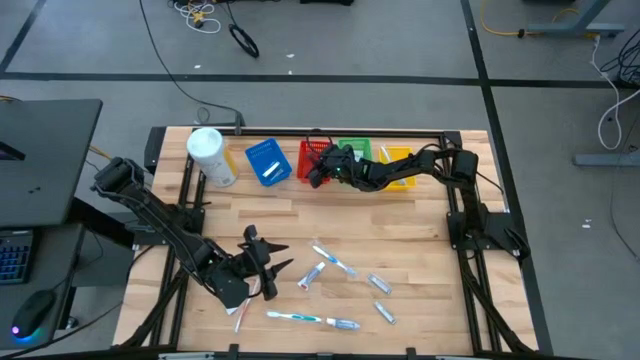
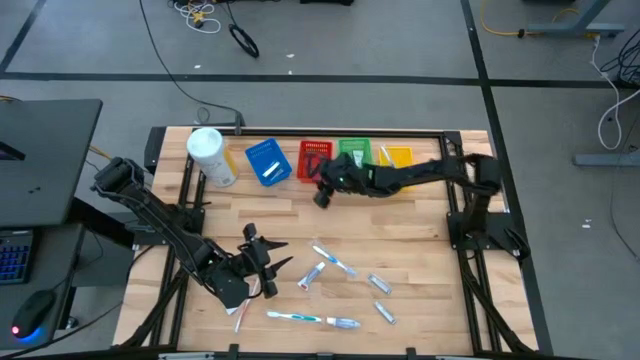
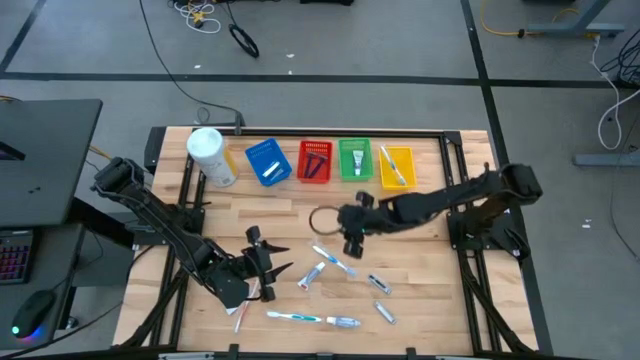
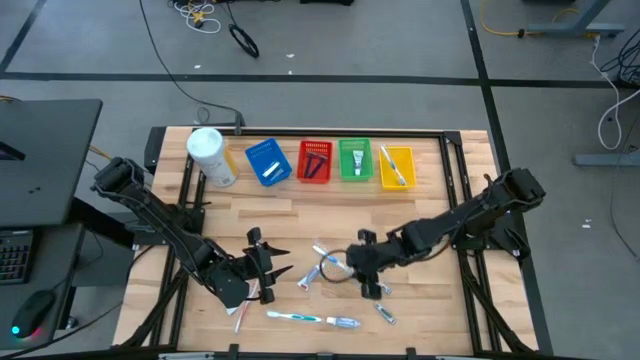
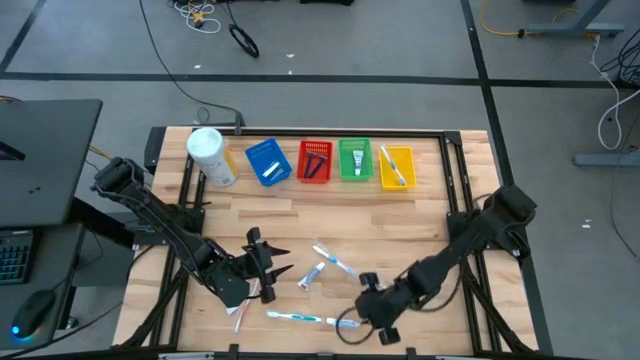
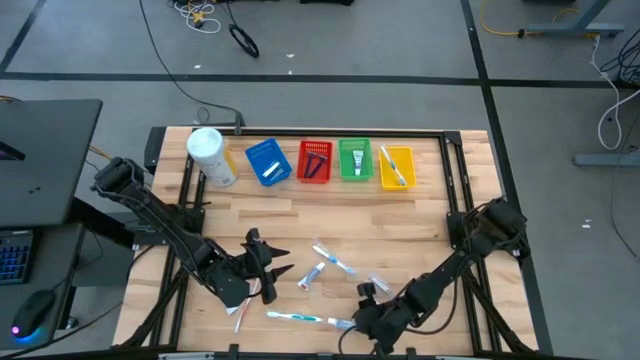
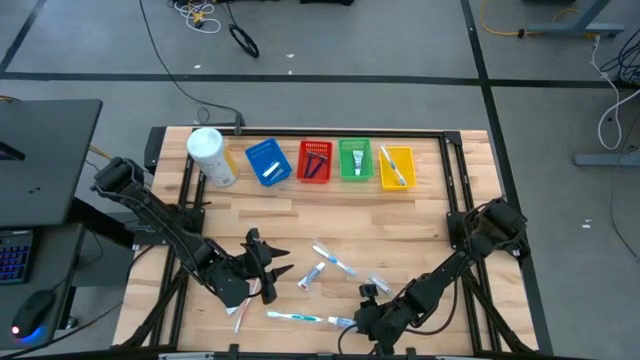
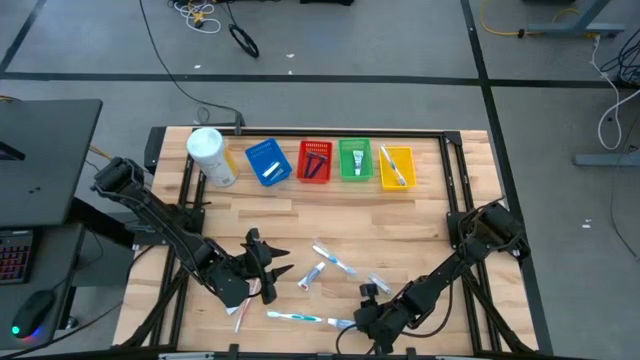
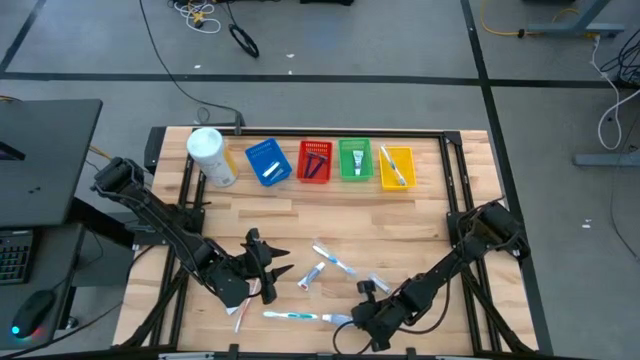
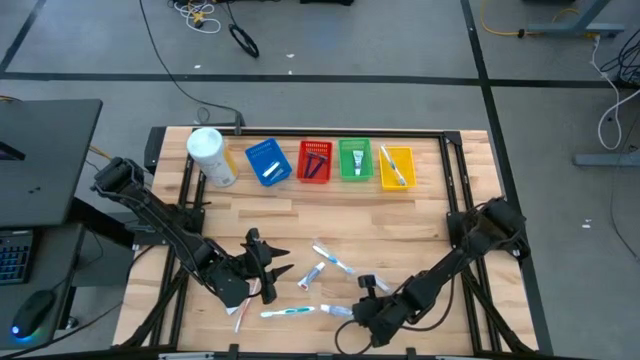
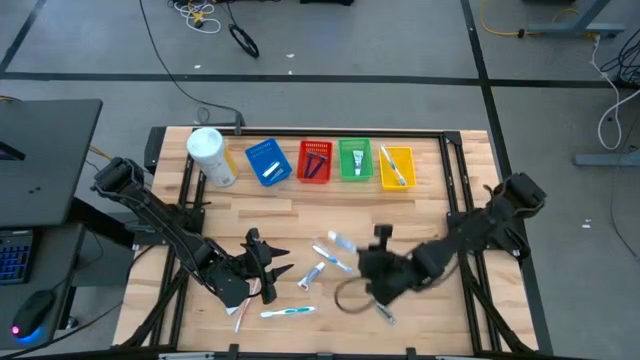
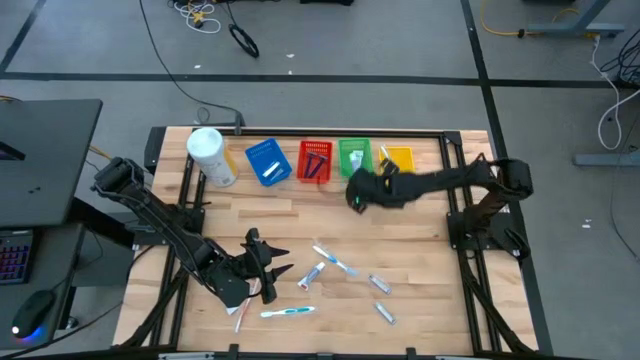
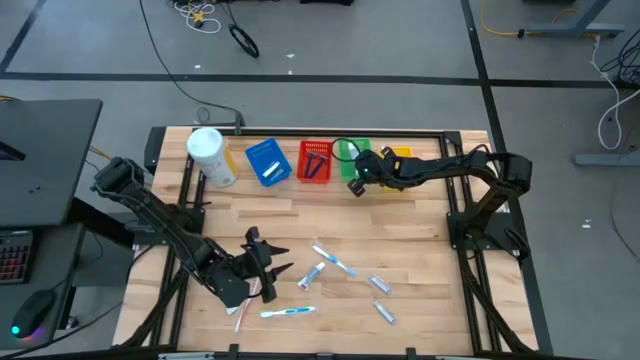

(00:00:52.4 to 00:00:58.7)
Task: Pick & Place Travel size toiletries
Put the white toothpaste into the green basket

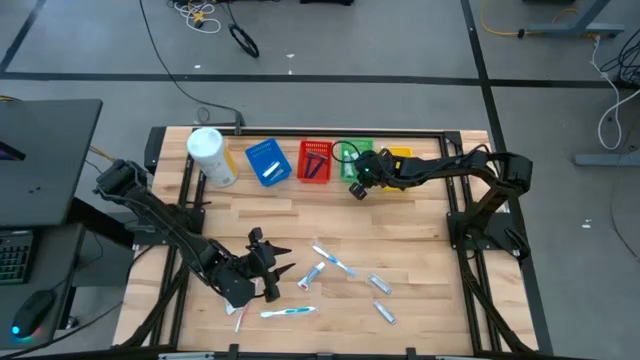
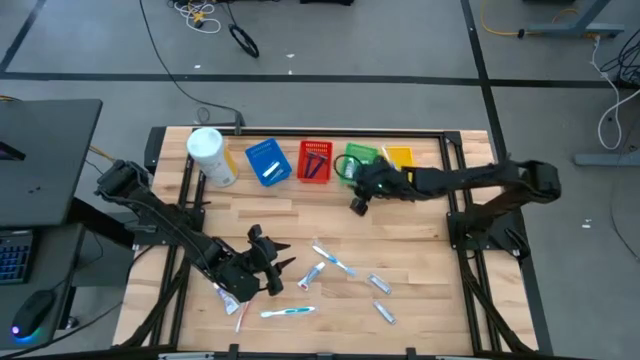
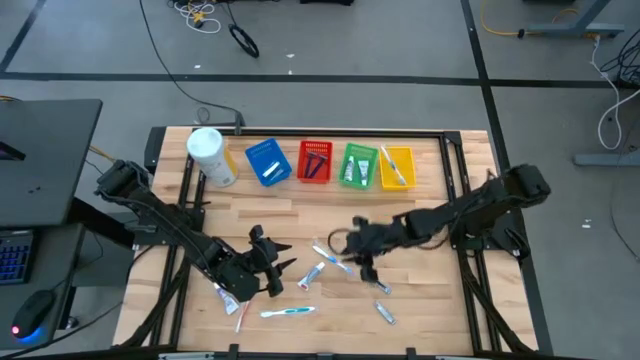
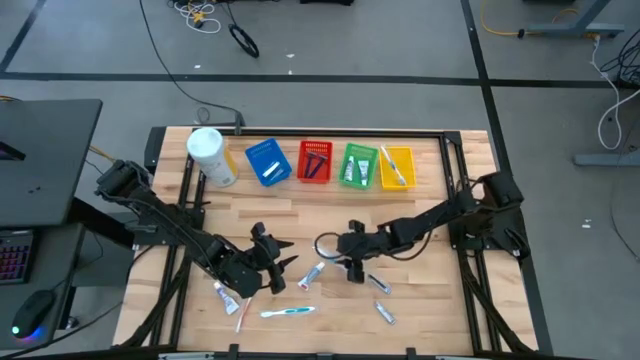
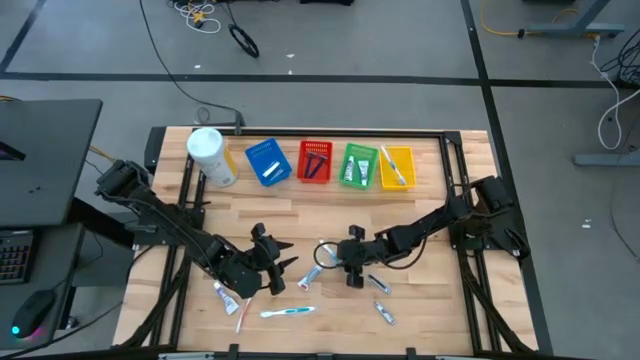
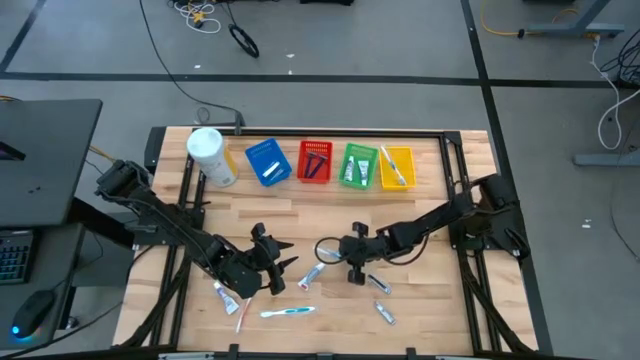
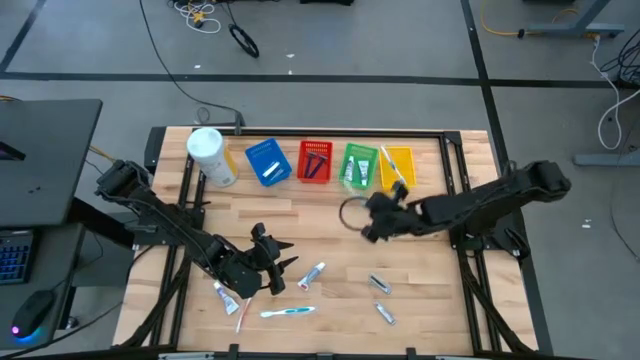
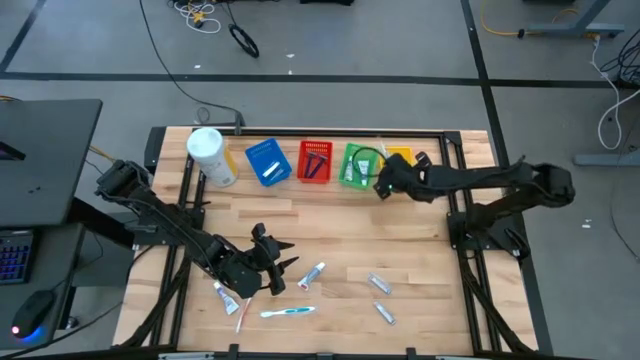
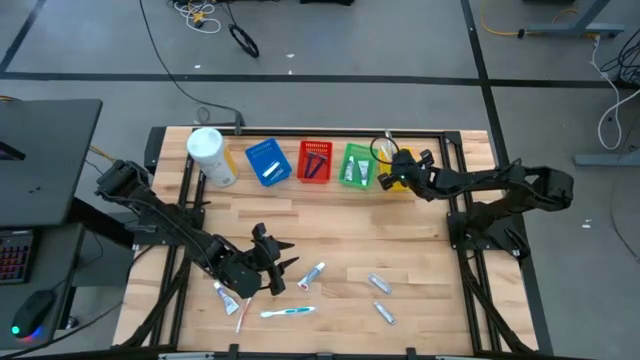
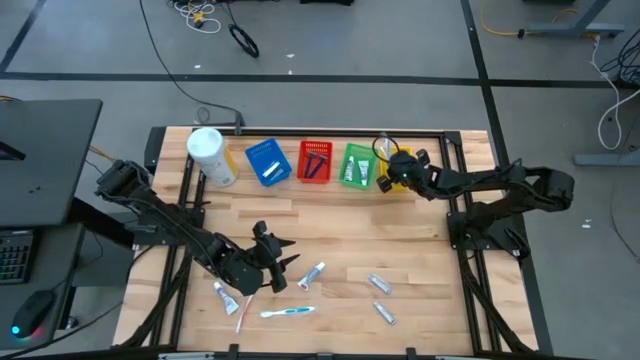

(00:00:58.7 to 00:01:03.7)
Put the blue toothbrush into the yellow basket

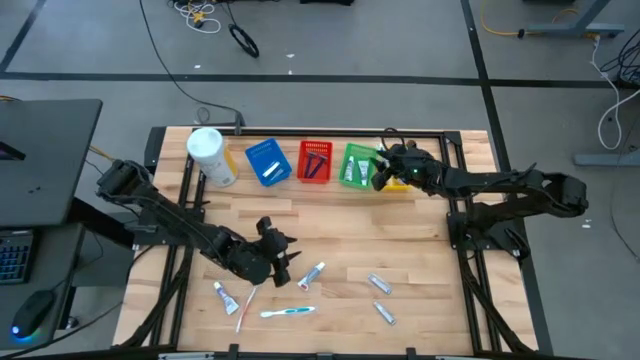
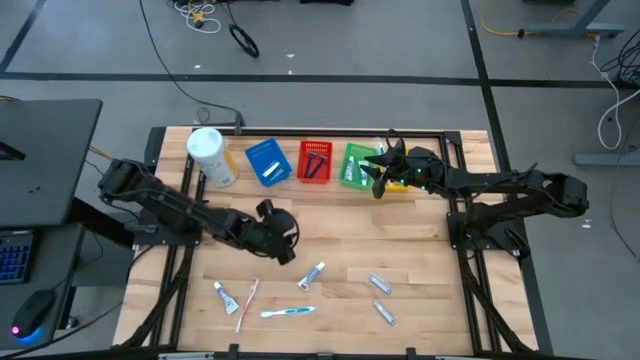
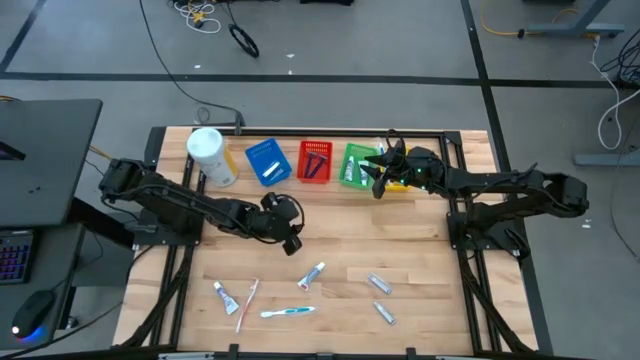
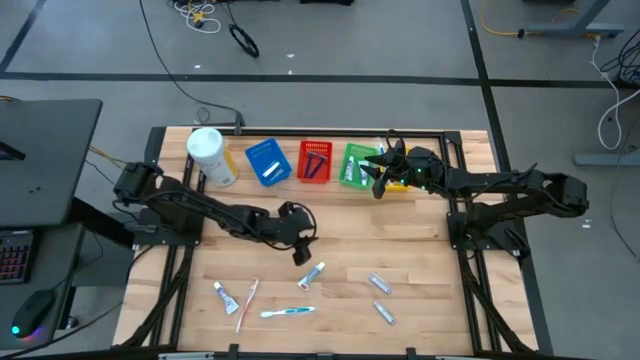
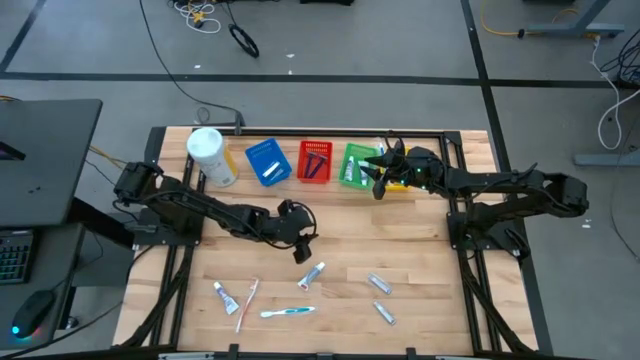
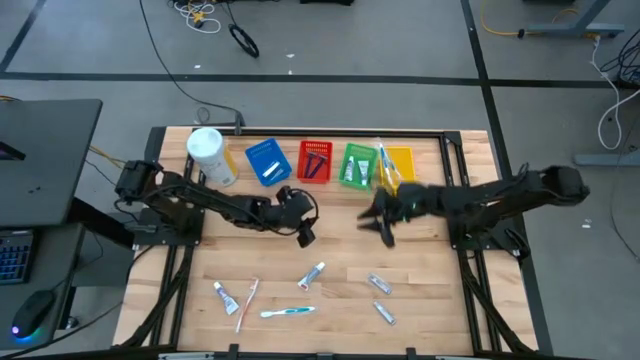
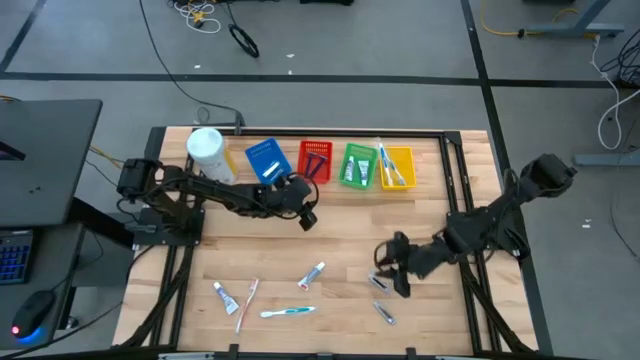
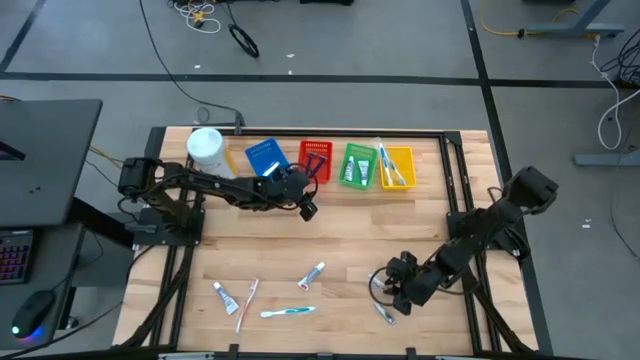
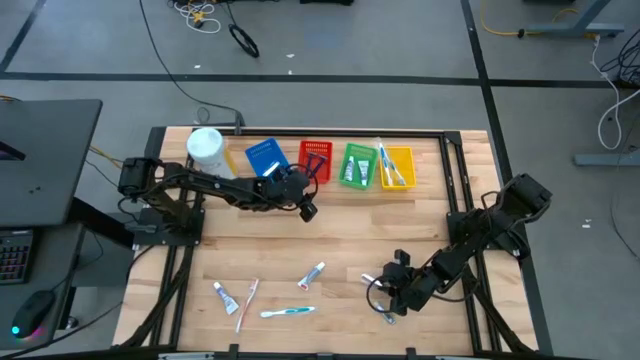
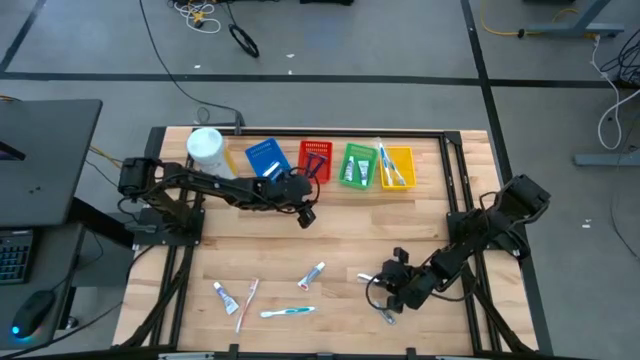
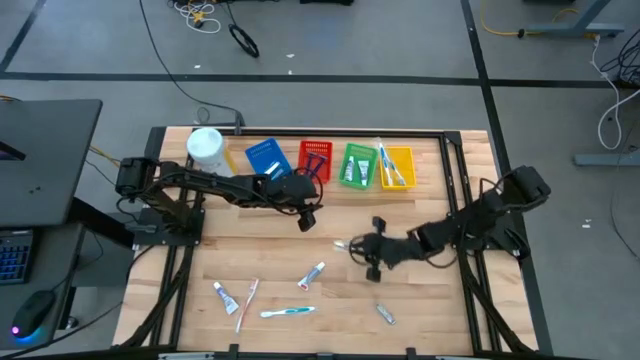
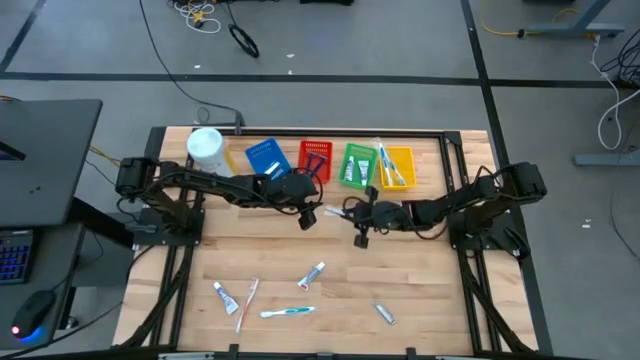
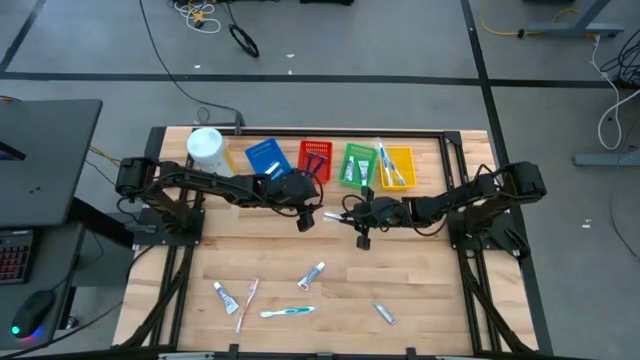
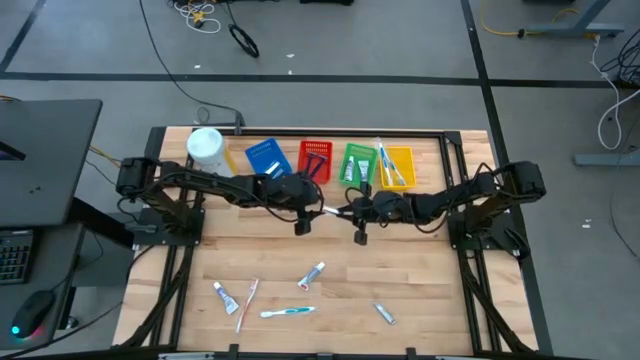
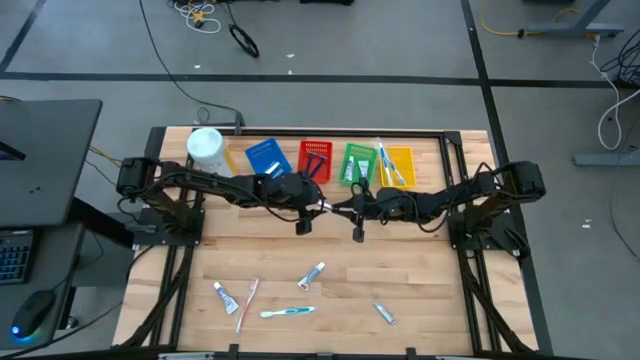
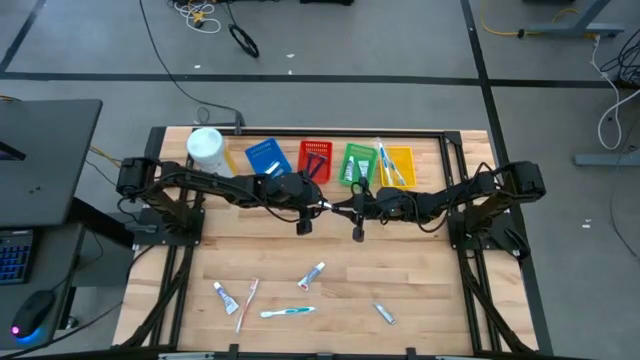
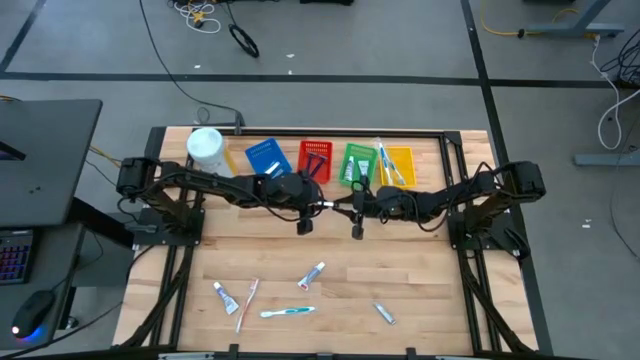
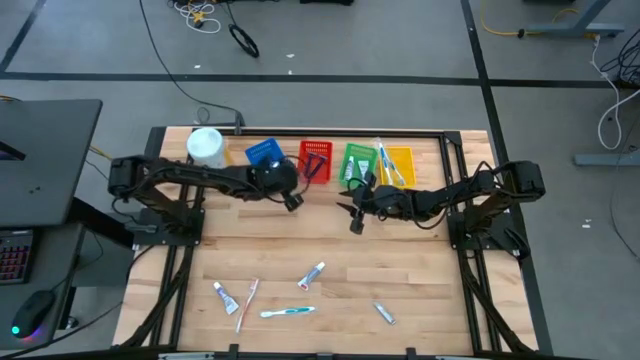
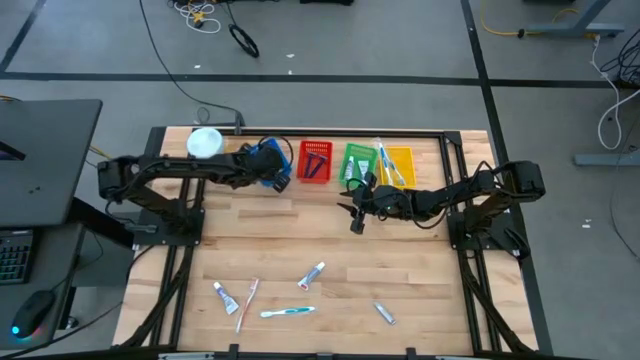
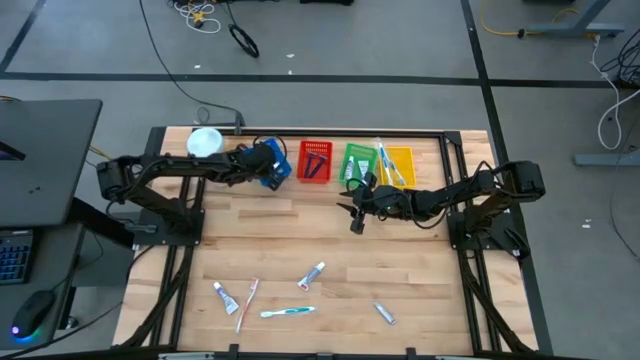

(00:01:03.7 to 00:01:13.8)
Put the silver nail cutter into the blue basket

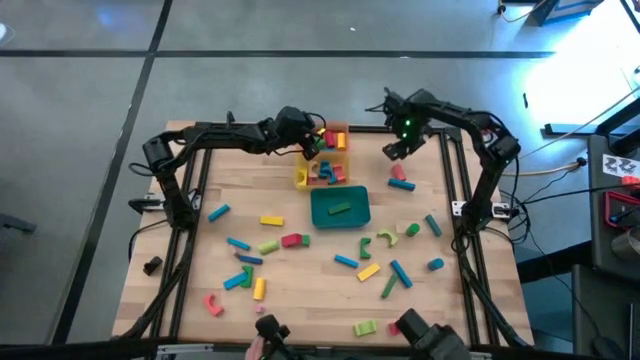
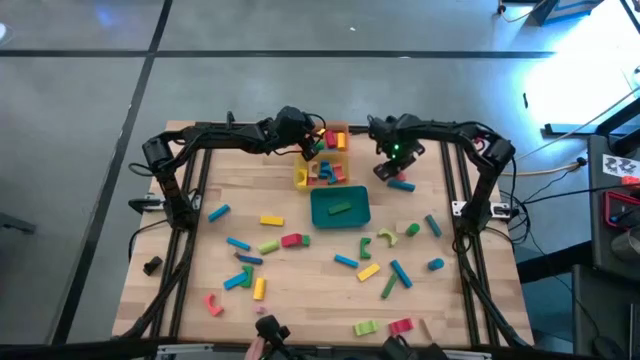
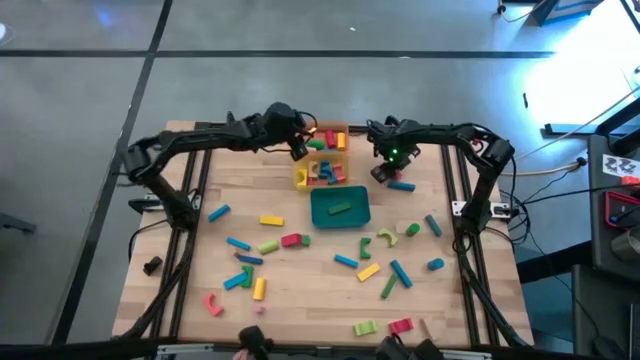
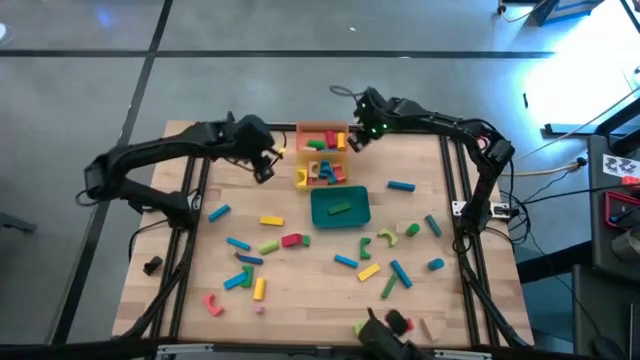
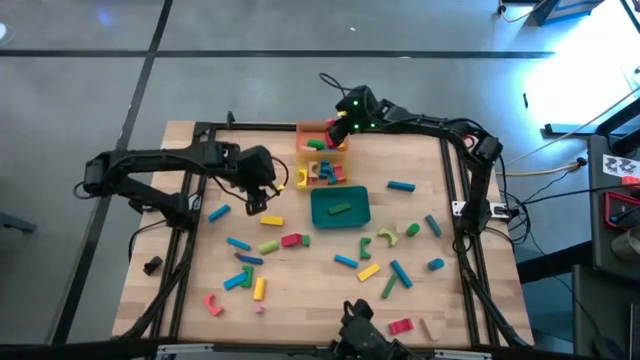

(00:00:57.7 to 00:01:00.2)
Task: Sort blocks by size
Put the orange cylinder block in the orange bin
